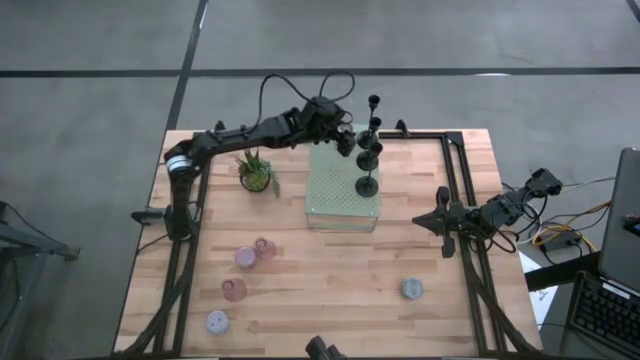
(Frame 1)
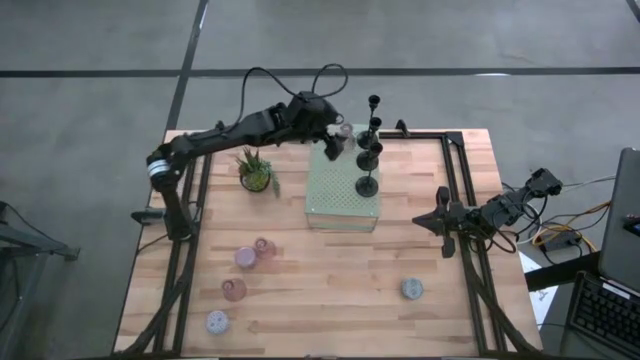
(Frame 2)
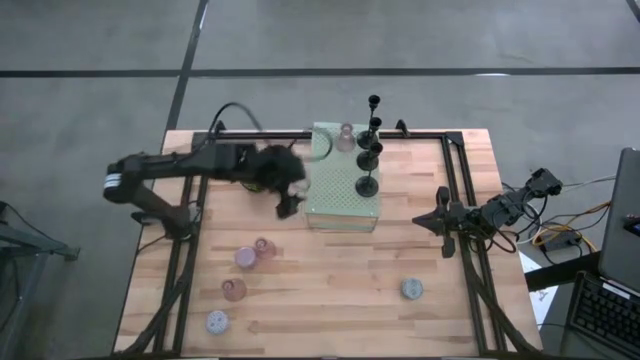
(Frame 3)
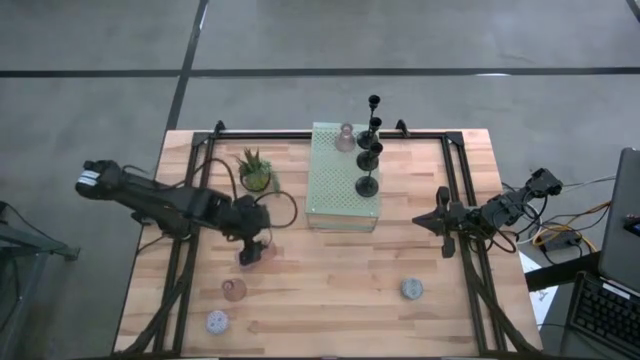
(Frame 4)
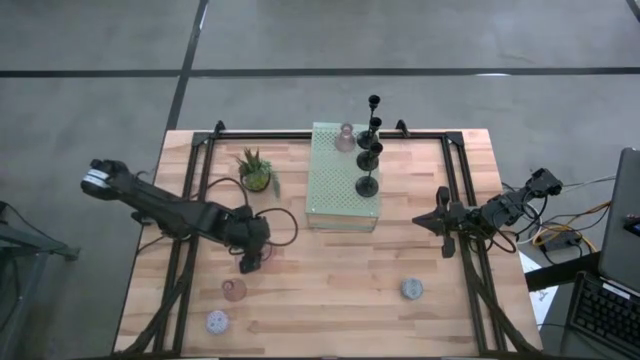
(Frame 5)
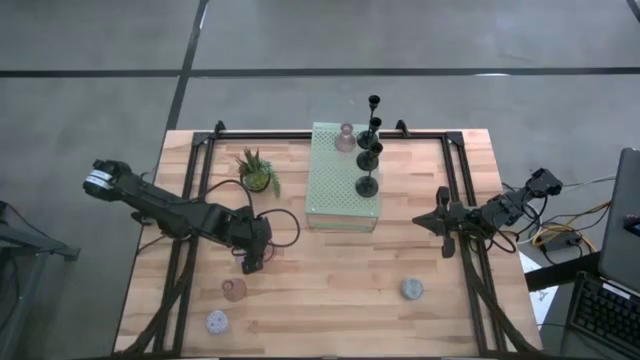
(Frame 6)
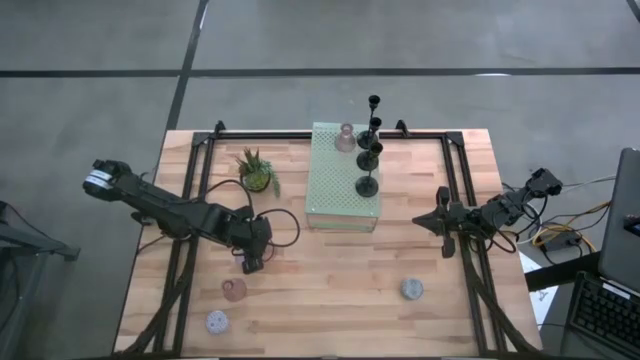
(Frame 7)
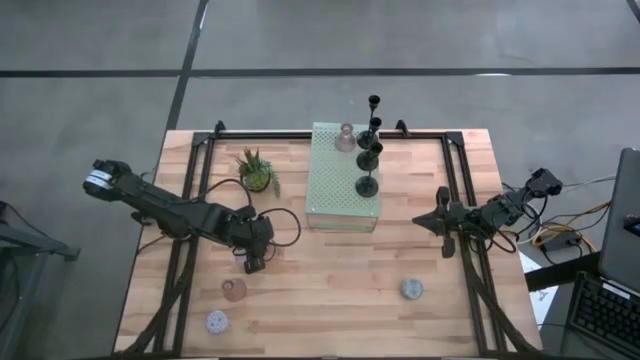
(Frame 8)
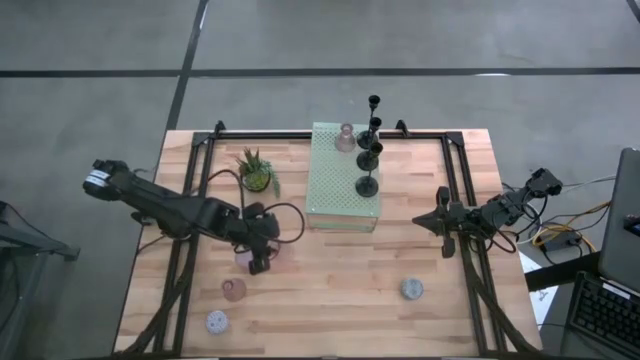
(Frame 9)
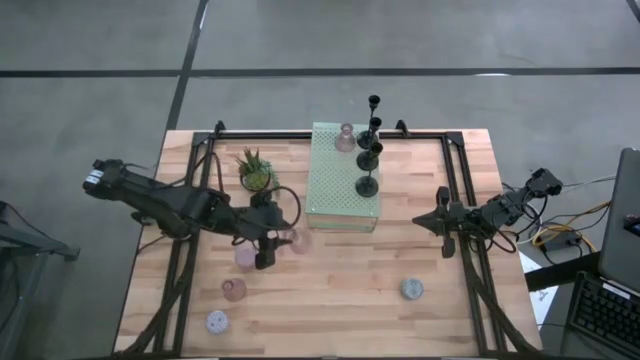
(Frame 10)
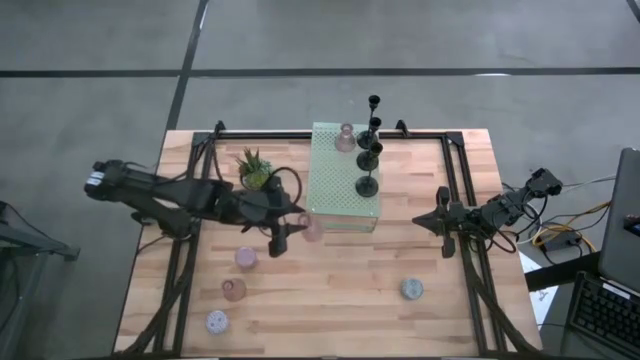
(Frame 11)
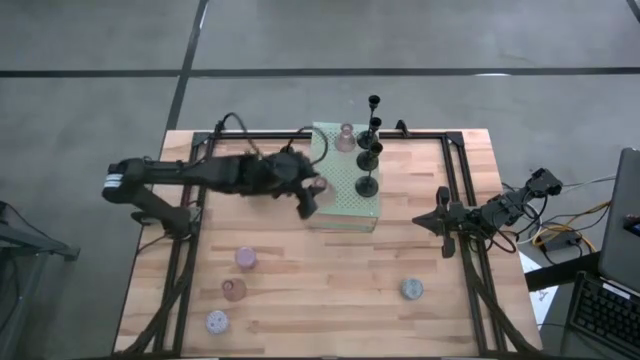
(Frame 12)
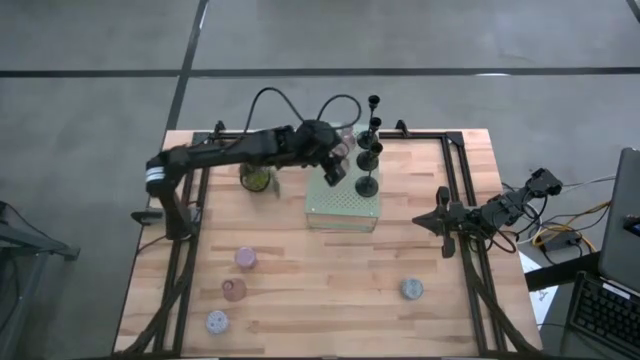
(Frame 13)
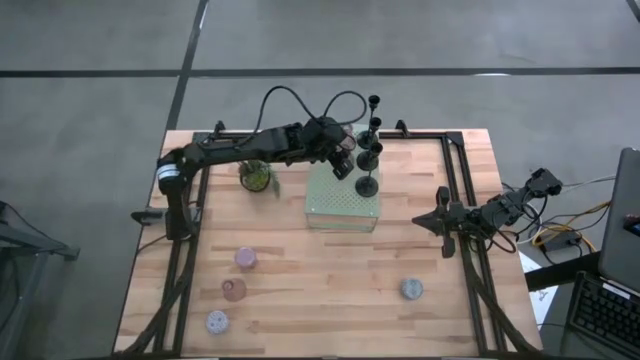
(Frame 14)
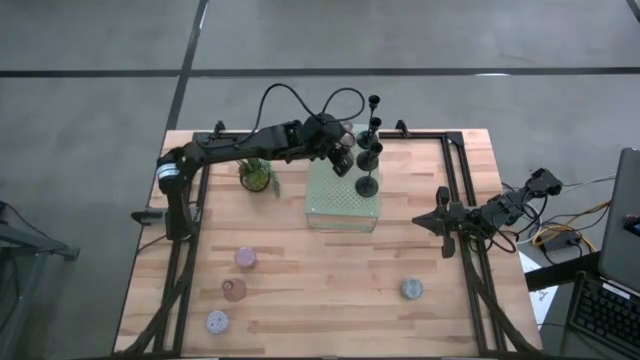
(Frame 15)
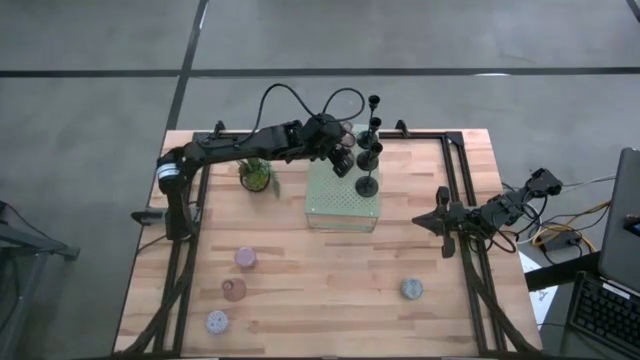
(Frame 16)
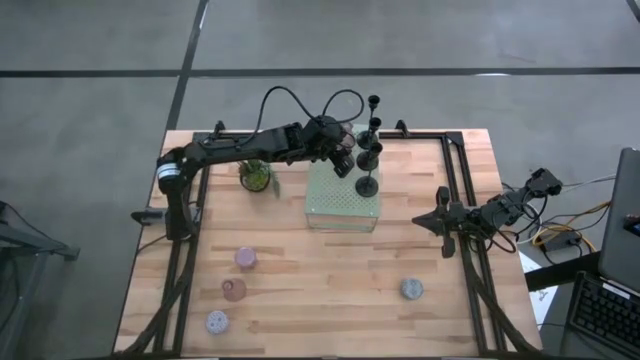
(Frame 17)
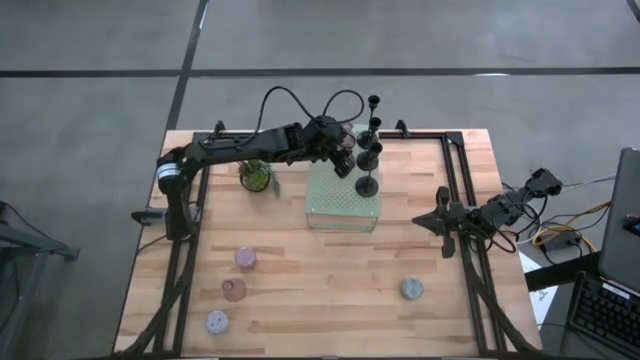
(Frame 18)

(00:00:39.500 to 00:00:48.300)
Task: Pick & Place candle stick holders
Put the top pink candle holder on the shelf aligned with the other pink candle holder

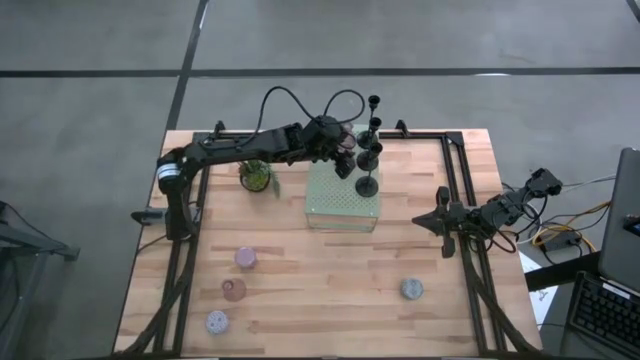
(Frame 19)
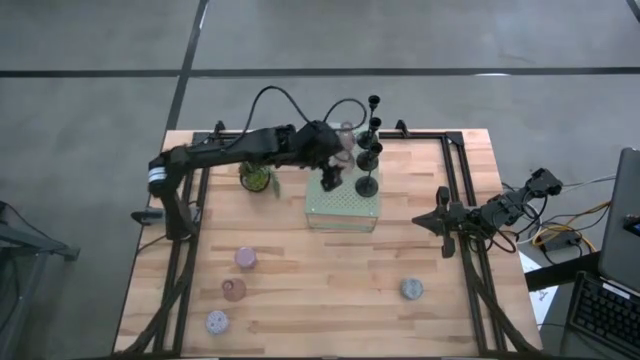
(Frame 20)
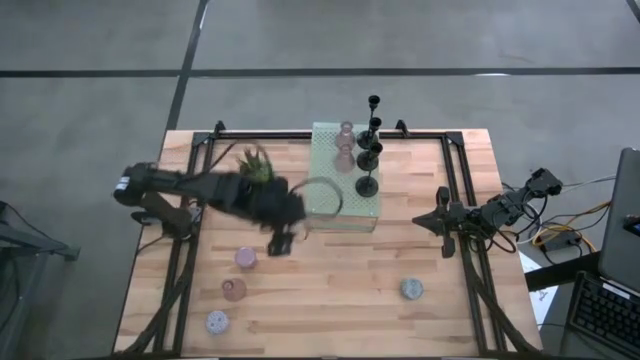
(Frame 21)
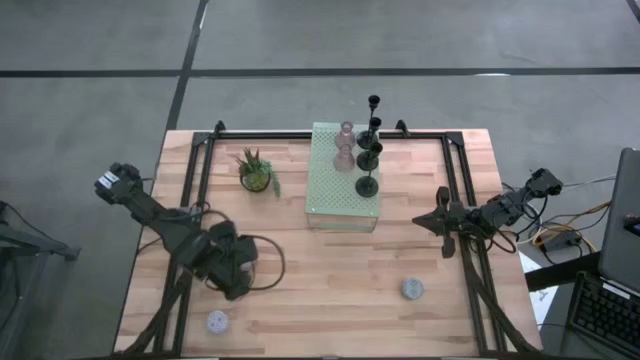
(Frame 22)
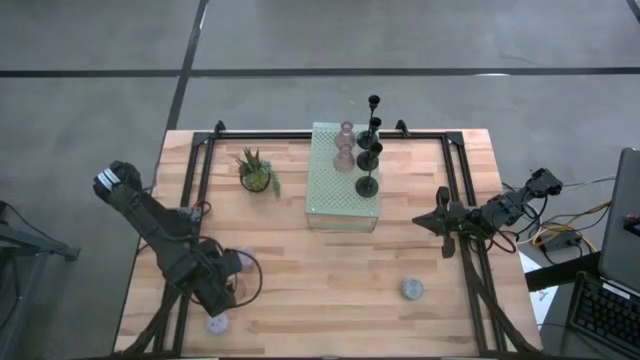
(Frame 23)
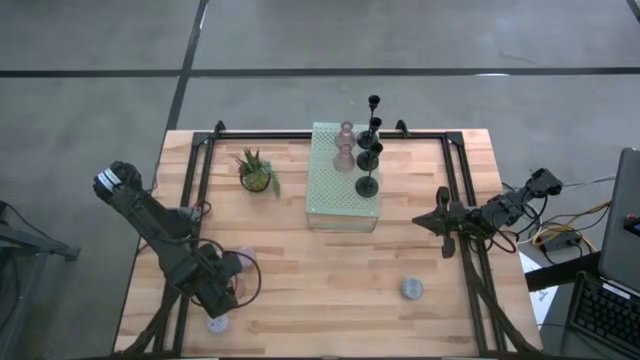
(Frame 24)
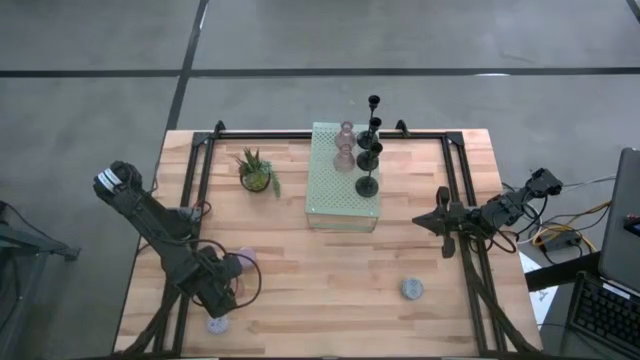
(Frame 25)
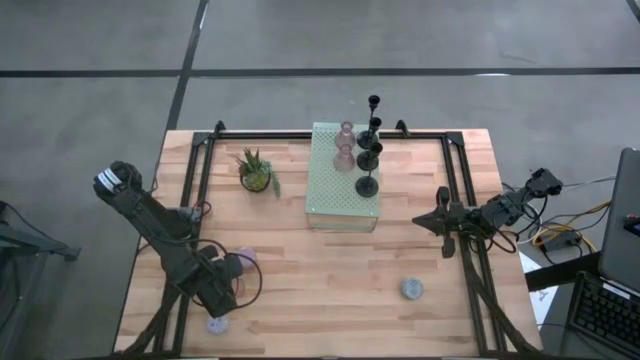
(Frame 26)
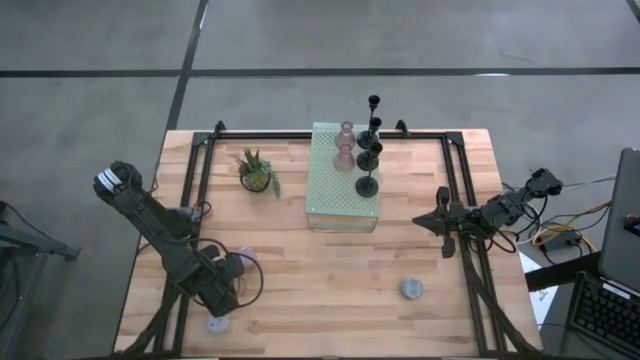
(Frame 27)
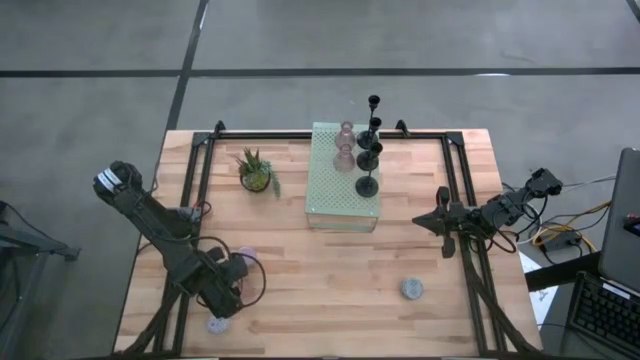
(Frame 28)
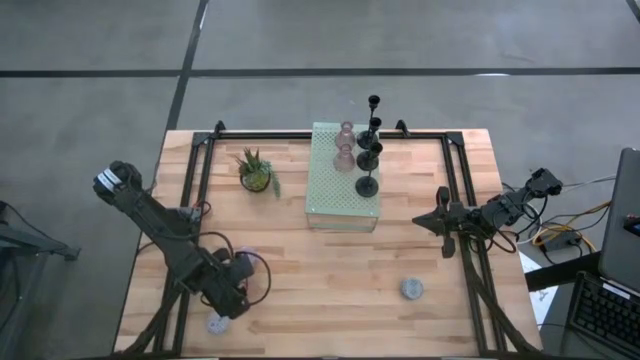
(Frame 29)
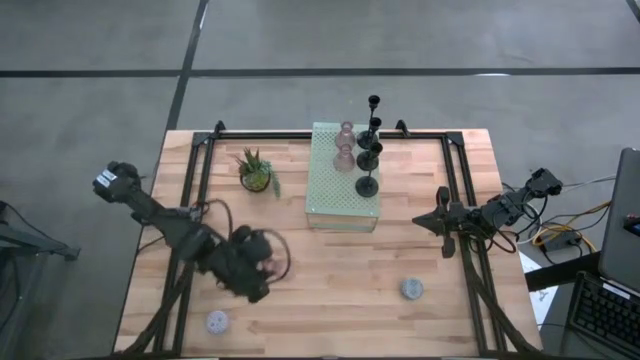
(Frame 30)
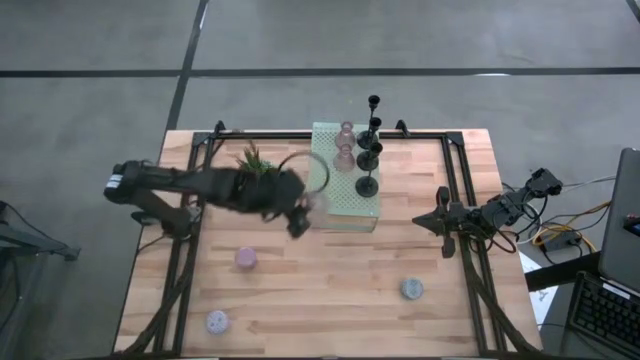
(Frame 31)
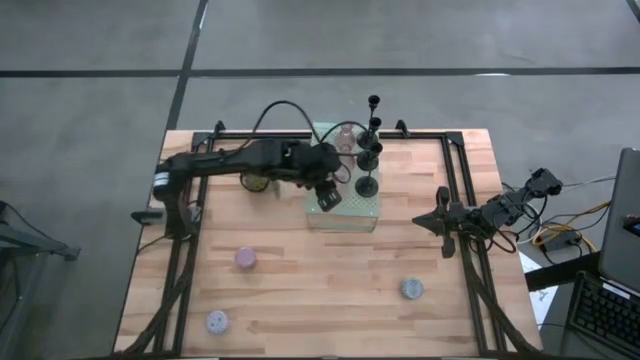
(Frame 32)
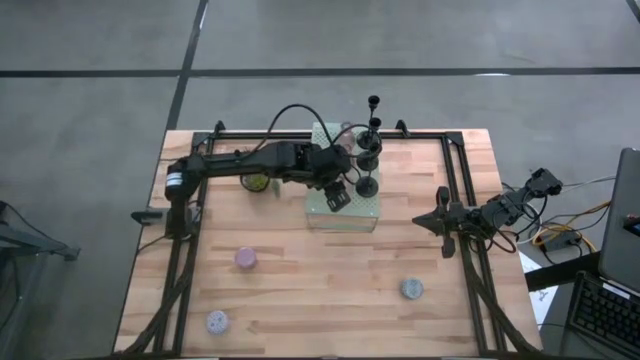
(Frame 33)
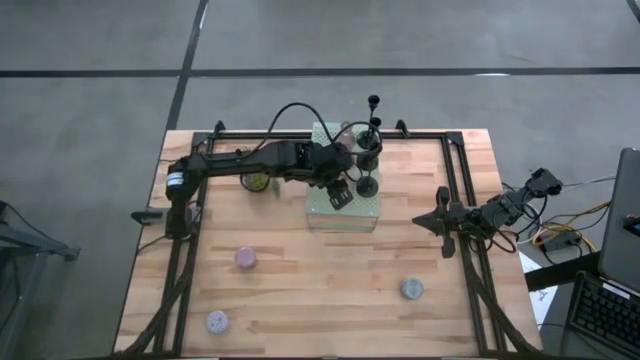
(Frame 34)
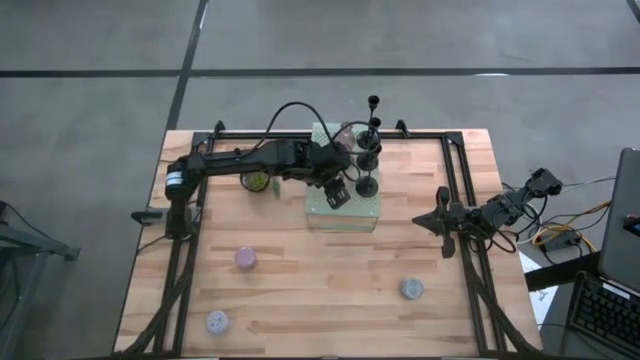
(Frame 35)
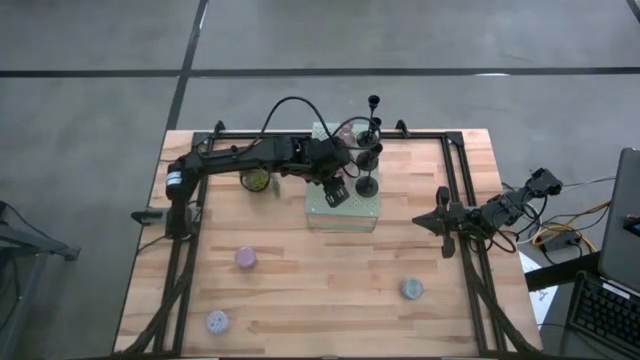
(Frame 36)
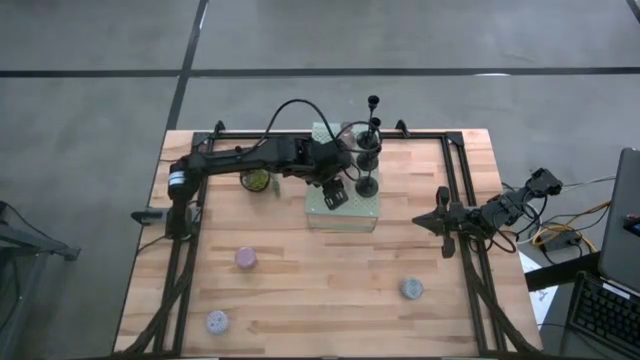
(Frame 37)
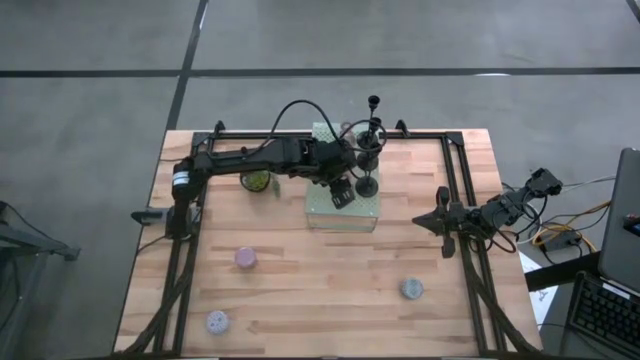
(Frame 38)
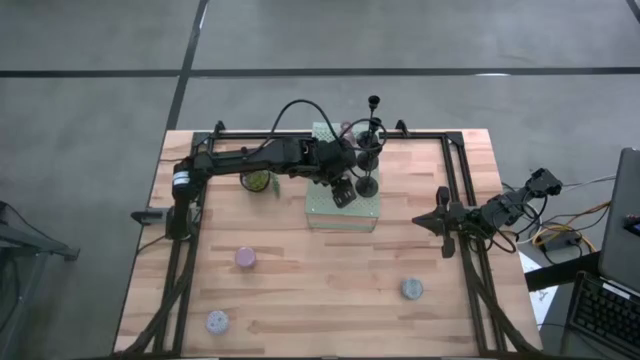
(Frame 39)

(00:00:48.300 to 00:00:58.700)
Put the pink candle holder on the shelf aligned with the other pink candle holder
